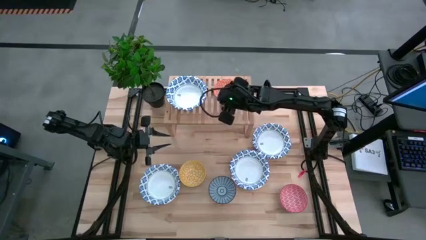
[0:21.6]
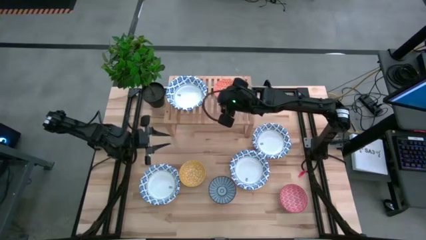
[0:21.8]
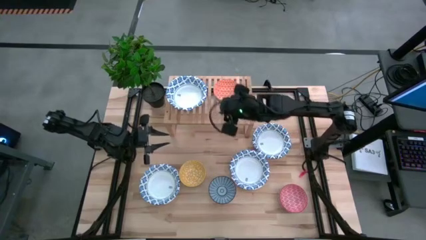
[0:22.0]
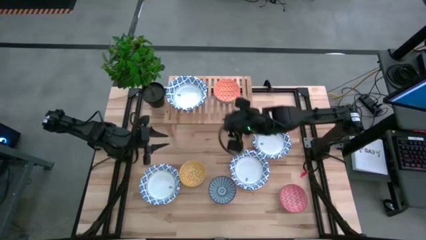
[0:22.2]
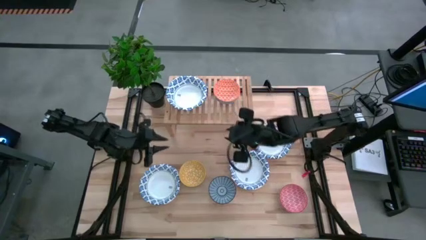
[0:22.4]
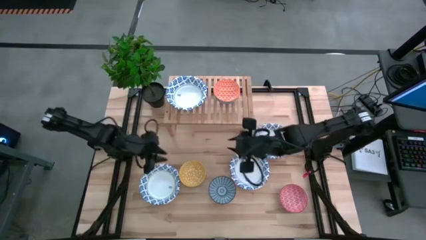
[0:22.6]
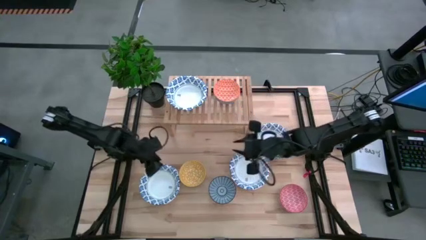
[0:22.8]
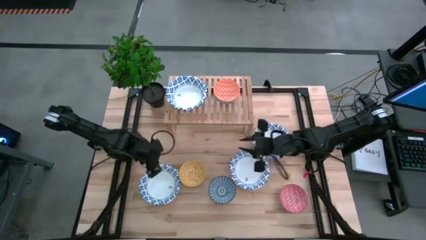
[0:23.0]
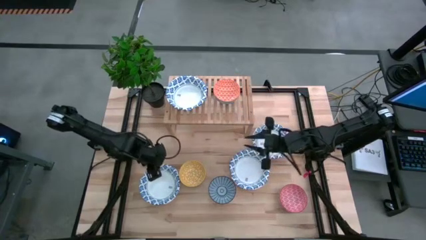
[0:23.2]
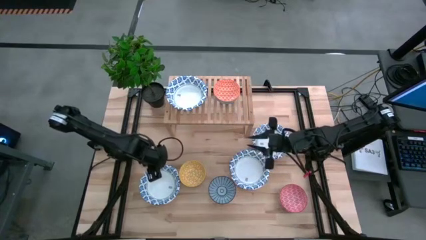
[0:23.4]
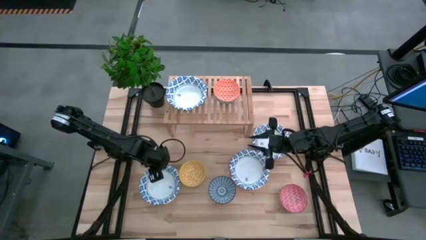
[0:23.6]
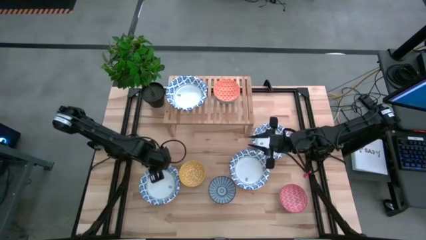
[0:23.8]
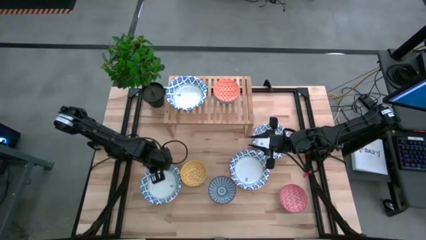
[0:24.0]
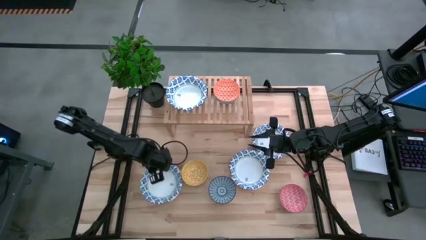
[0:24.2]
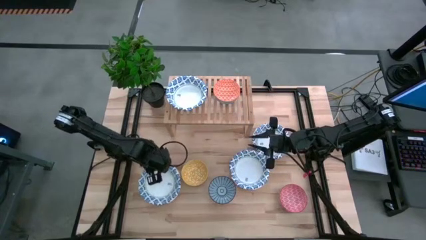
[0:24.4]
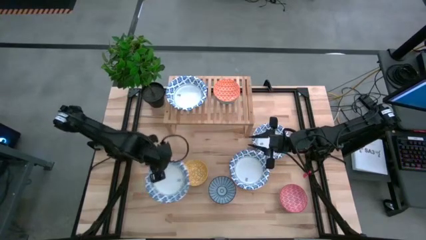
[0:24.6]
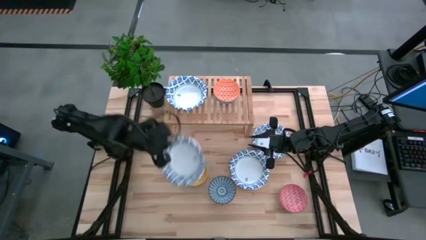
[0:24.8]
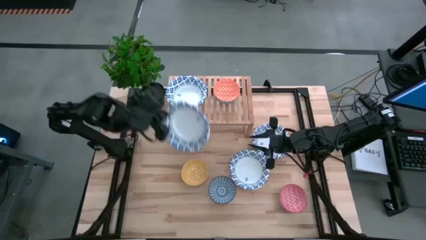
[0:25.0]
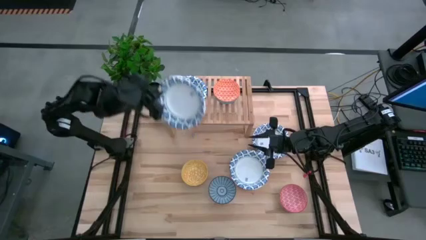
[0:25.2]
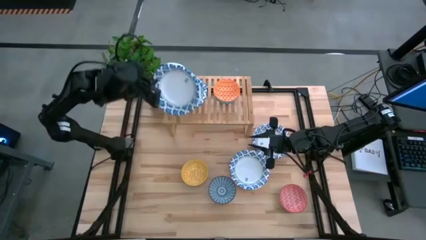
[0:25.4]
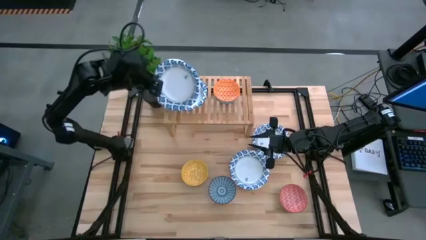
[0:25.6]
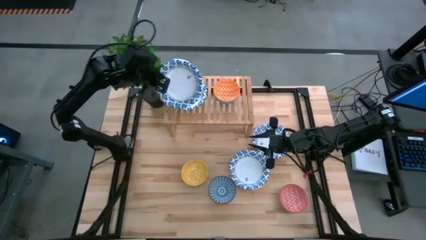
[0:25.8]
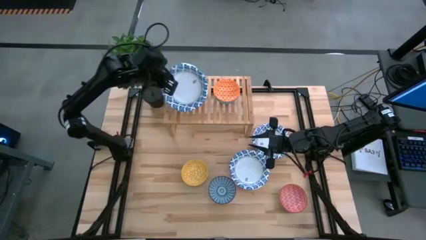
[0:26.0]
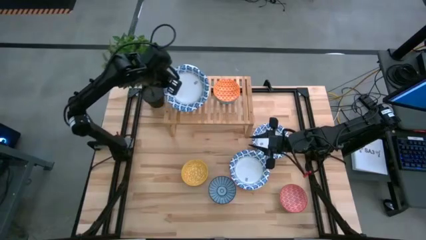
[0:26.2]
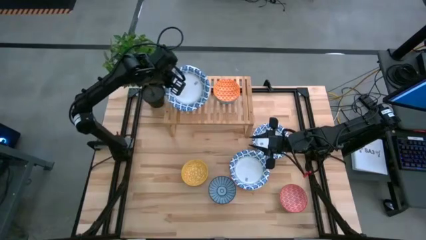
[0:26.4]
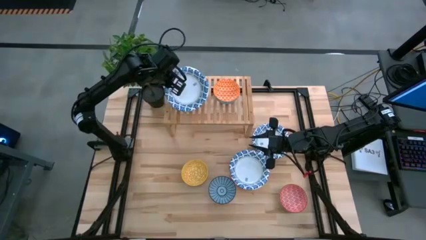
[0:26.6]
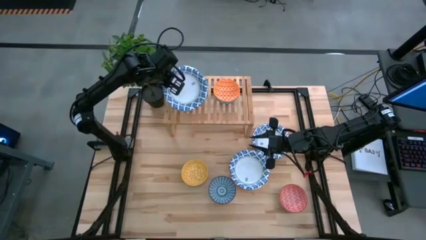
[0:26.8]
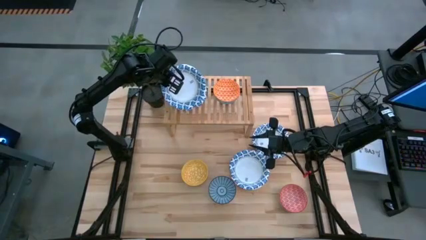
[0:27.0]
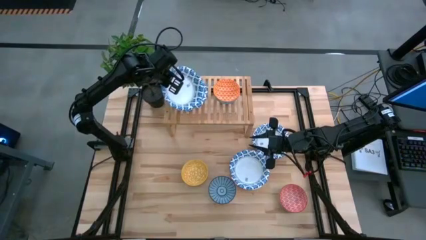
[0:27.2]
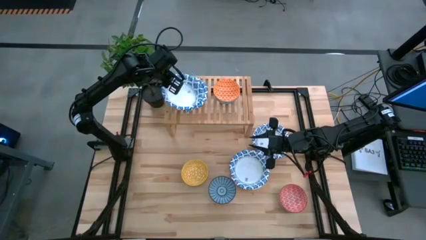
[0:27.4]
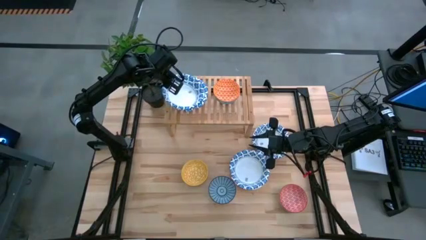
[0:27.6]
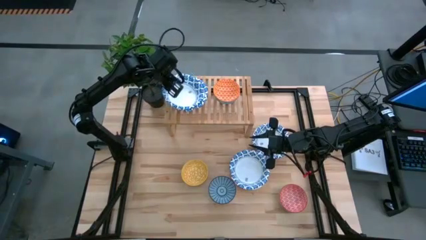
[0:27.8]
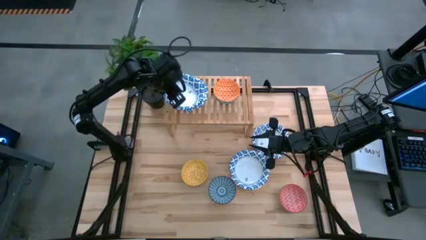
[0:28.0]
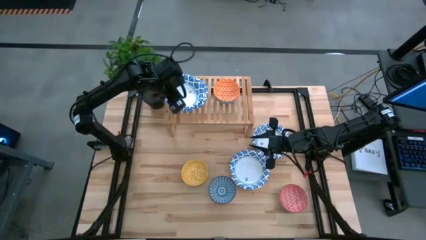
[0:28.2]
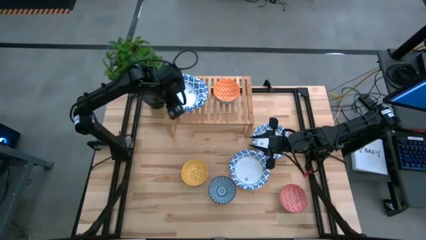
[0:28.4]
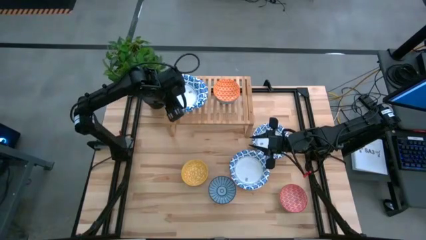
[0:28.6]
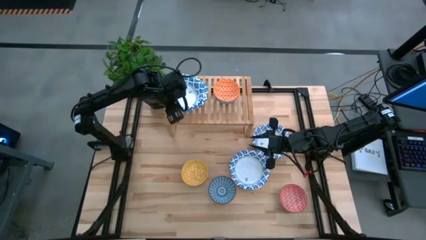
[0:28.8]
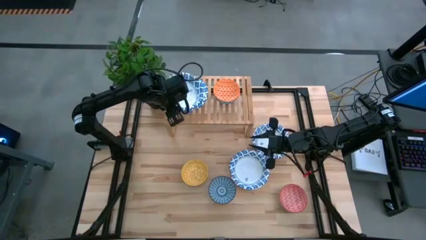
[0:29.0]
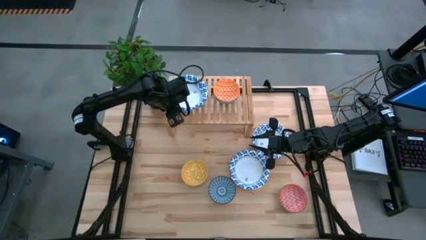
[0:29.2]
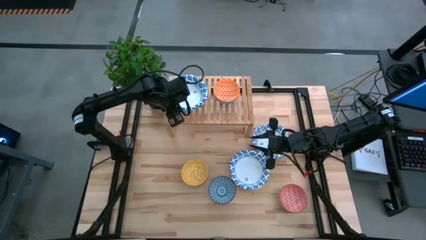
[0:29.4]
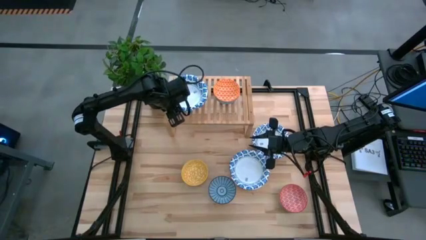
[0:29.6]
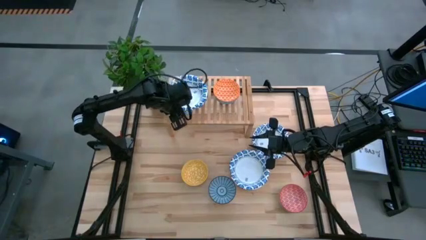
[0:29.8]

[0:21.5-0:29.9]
Task: Place and stack bowls onto a shelf
Stack the white blue patterned bowl on top of the white blue patterned bowl on the shelf

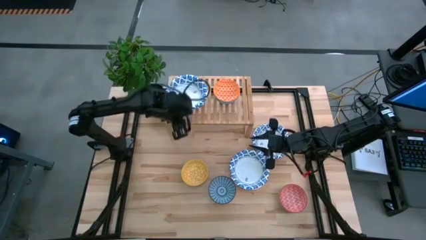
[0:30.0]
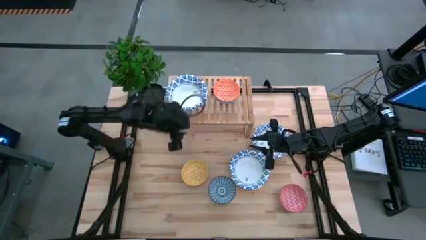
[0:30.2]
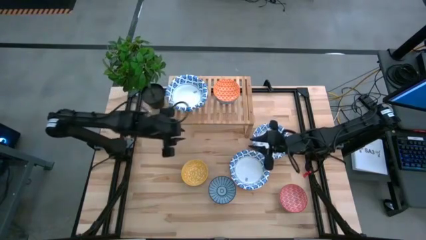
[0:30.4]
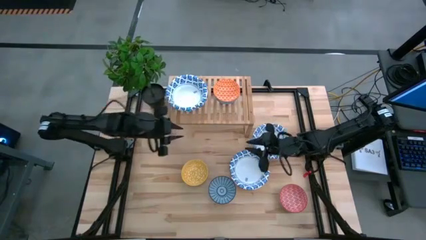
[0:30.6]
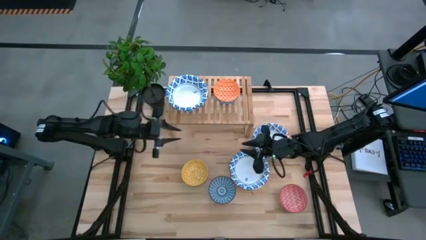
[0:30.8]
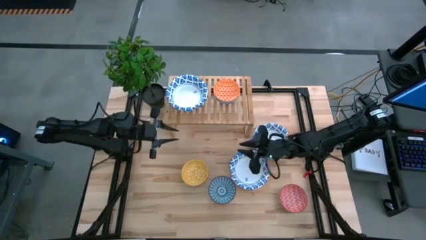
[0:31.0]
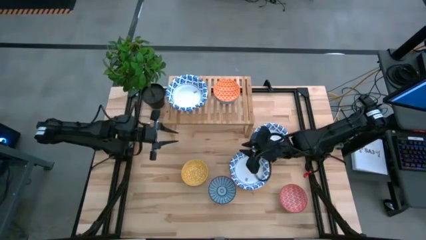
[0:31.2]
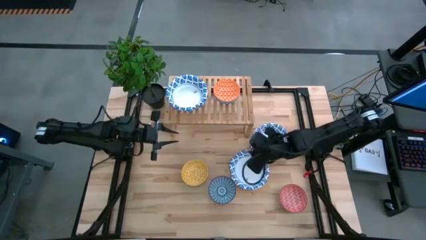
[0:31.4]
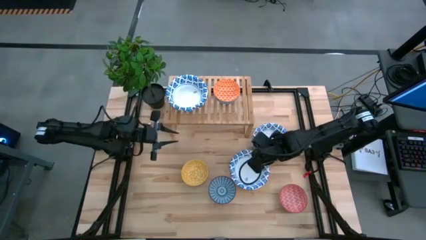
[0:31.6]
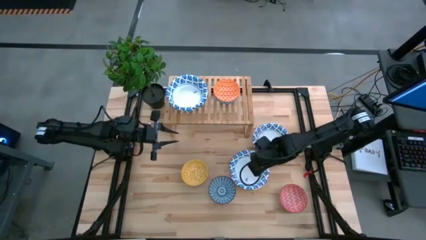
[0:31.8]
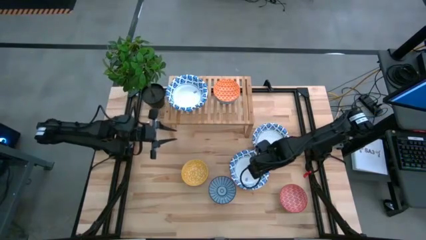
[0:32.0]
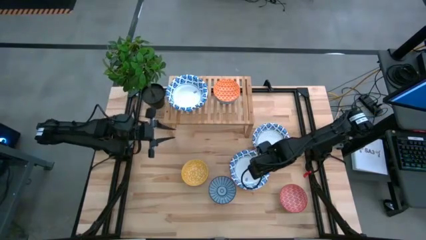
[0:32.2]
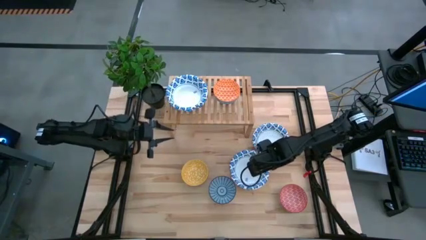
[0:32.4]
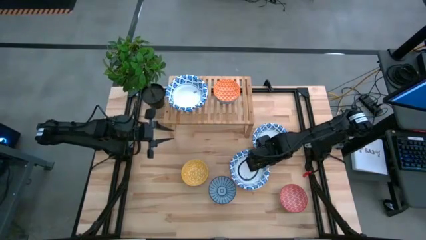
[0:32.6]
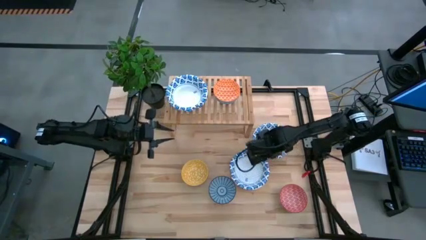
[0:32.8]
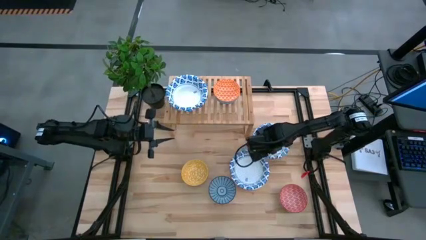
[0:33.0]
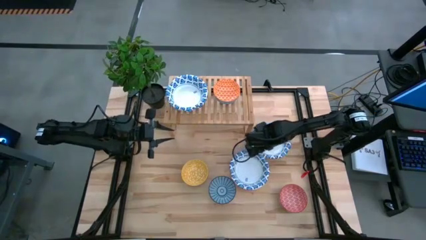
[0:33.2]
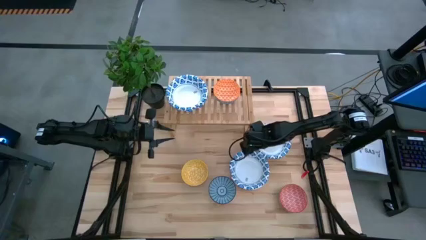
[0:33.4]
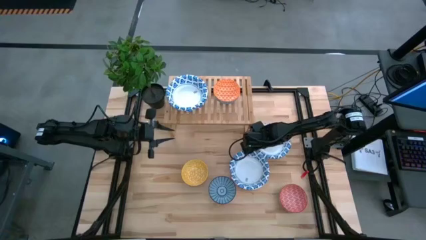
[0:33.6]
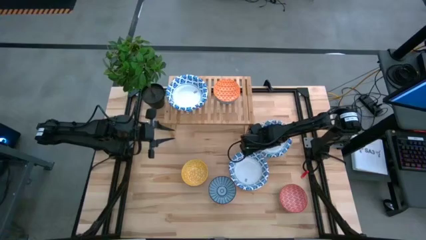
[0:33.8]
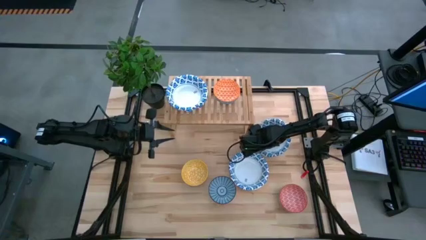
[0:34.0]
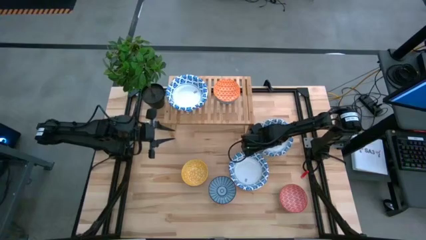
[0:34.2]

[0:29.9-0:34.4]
Stack the white blue patterned bowl on top of the white blue patterned bowl on the shelf

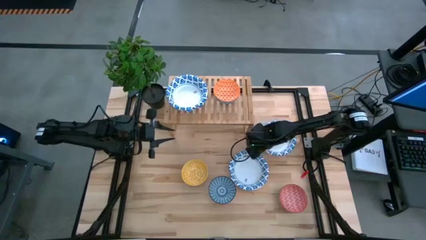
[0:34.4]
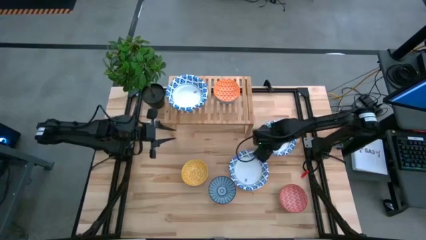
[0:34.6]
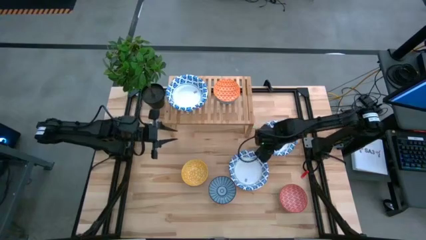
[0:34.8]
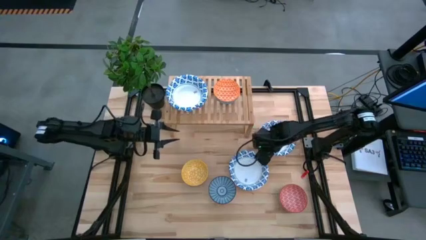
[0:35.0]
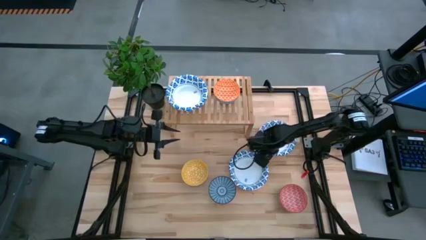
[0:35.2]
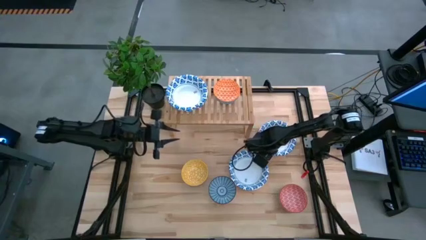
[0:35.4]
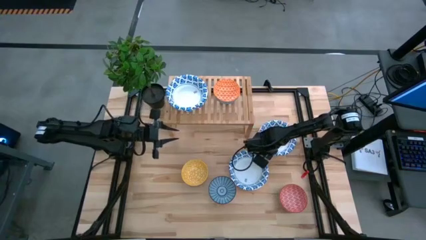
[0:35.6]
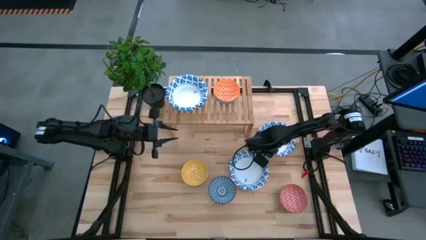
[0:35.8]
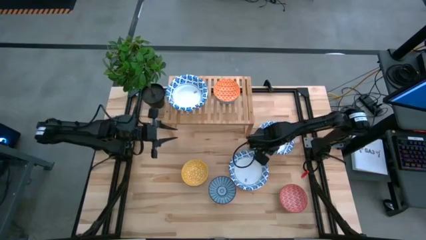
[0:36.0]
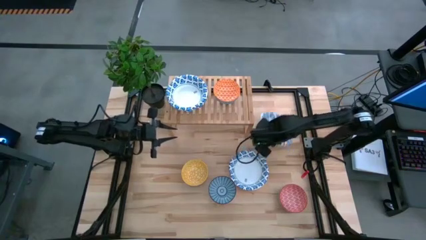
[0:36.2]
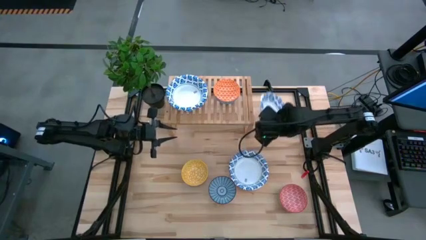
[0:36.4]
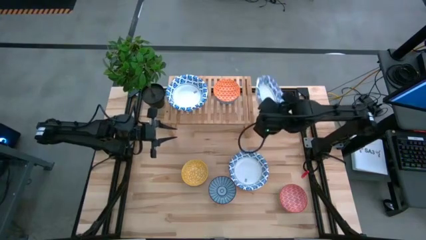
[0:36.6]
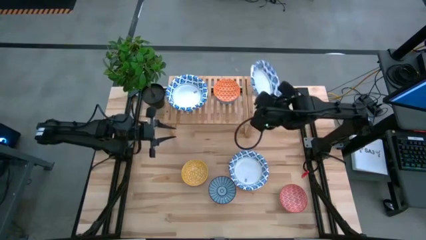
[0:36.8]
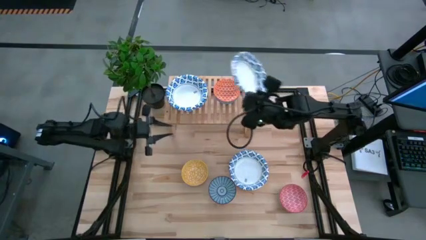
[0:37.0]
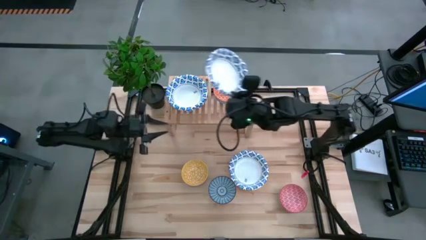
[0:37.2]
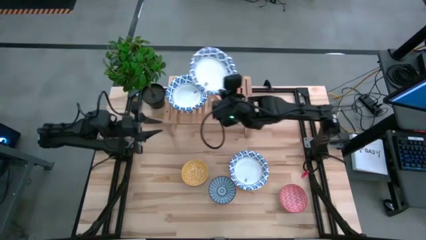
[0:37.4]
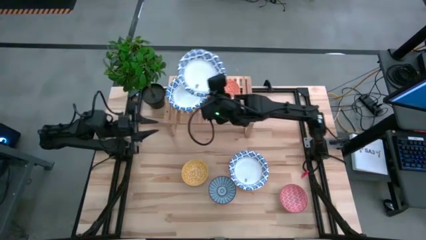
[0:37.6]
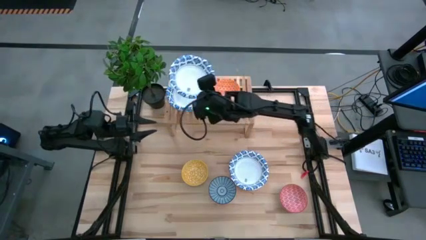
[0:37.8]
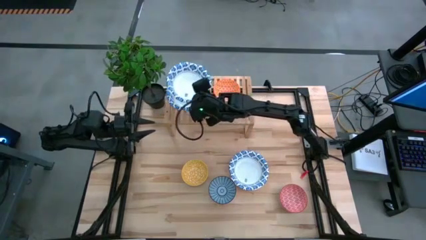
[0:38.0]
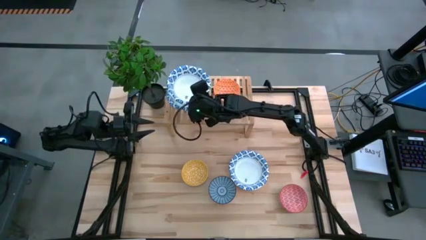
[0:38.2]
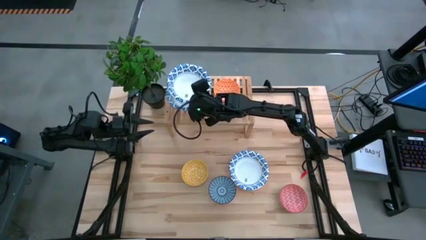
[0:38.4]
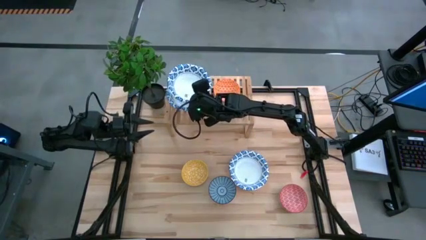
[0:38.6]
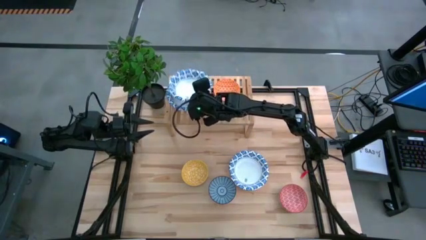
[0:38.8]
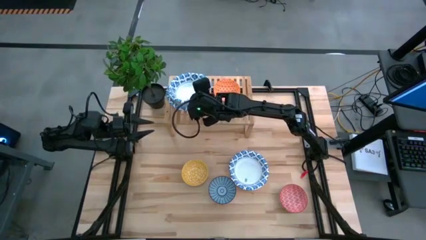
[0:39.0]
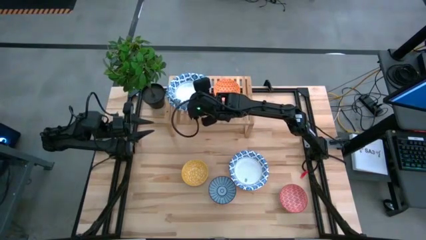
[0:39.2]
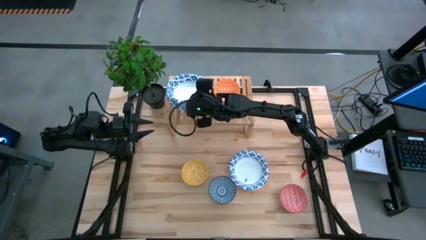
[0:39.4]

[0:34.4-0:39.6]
Stack the white blue patterned bowl on top of the white blue patterned bowl on the shelf
